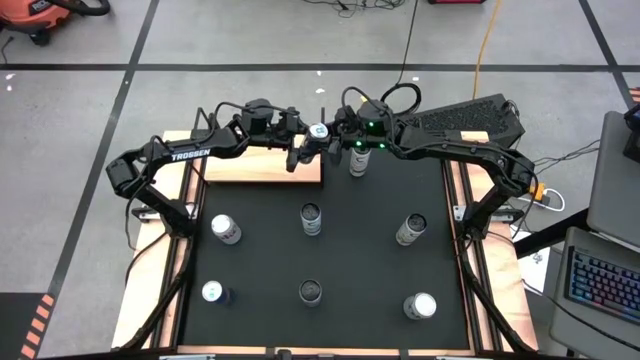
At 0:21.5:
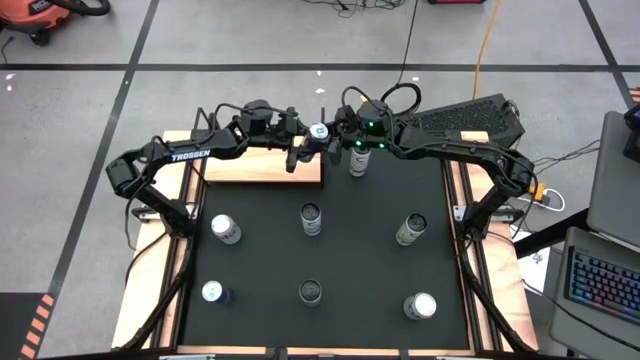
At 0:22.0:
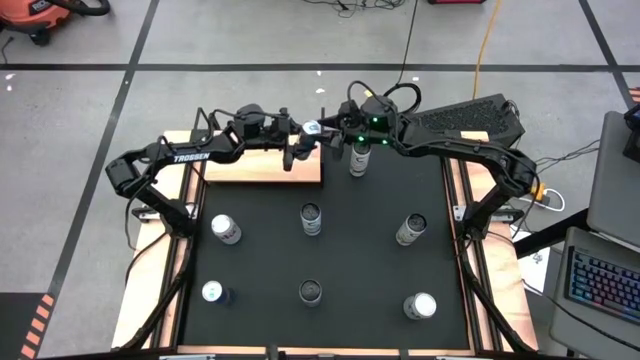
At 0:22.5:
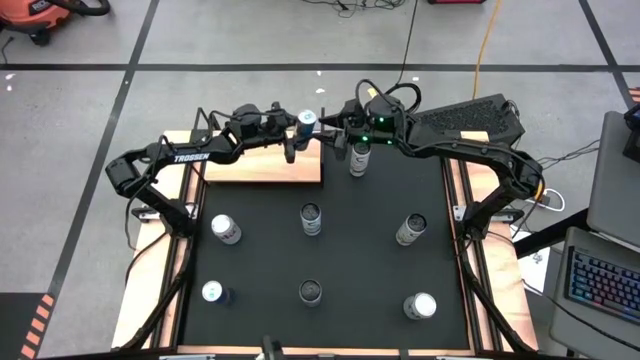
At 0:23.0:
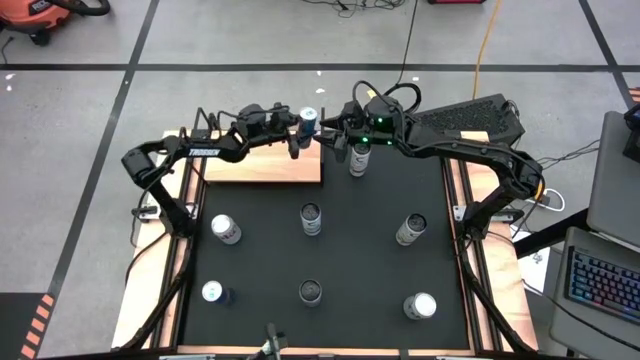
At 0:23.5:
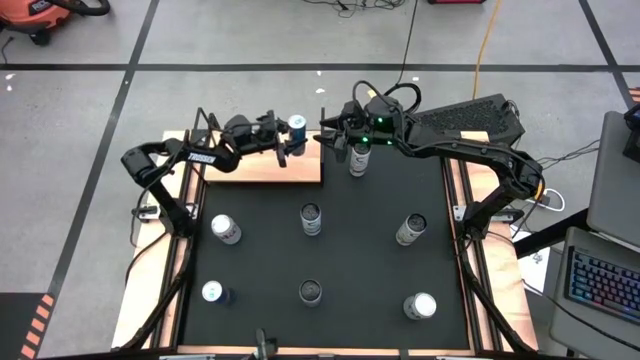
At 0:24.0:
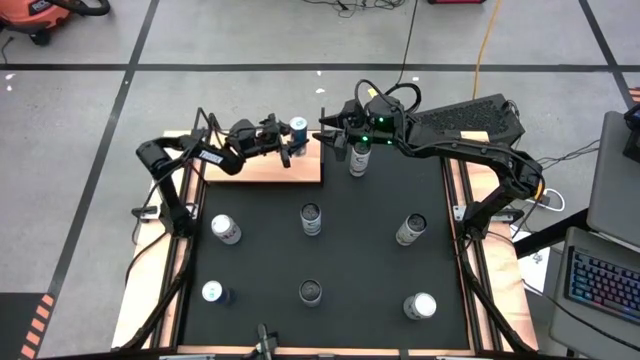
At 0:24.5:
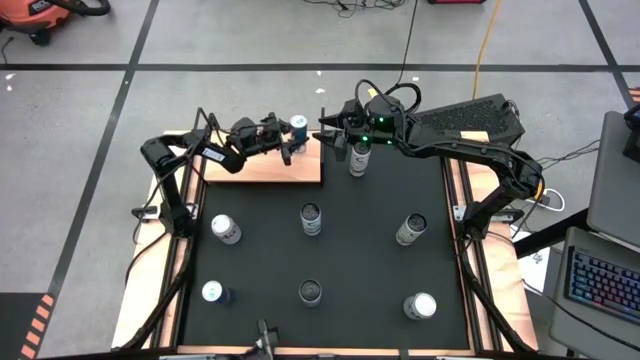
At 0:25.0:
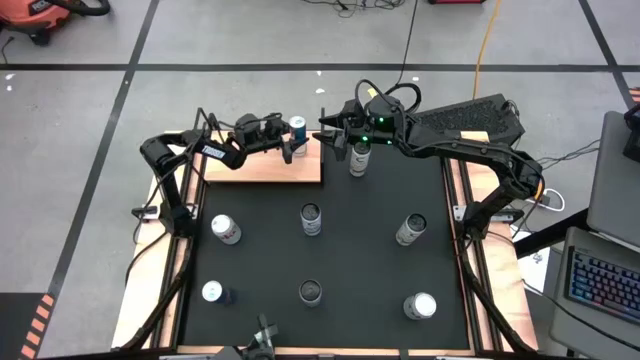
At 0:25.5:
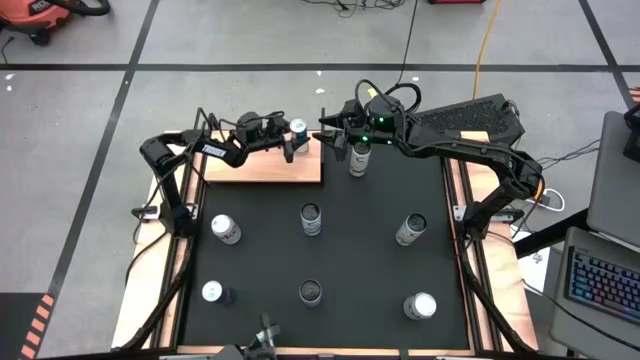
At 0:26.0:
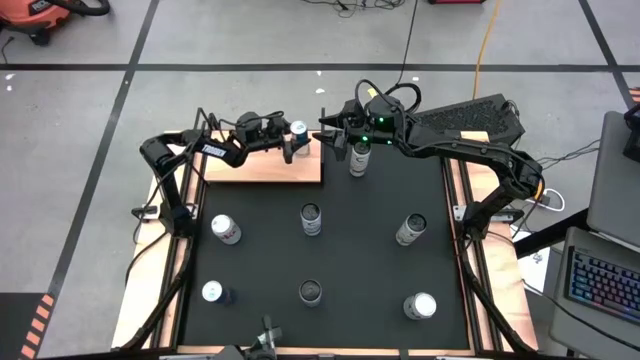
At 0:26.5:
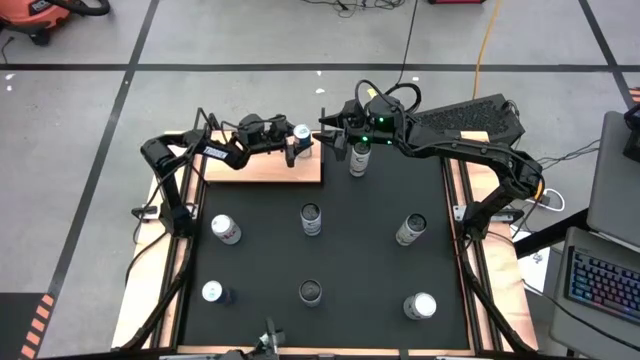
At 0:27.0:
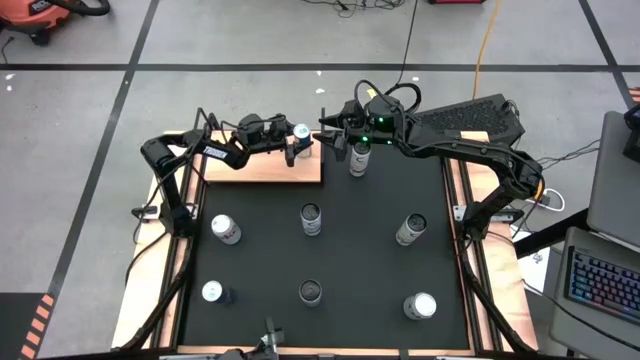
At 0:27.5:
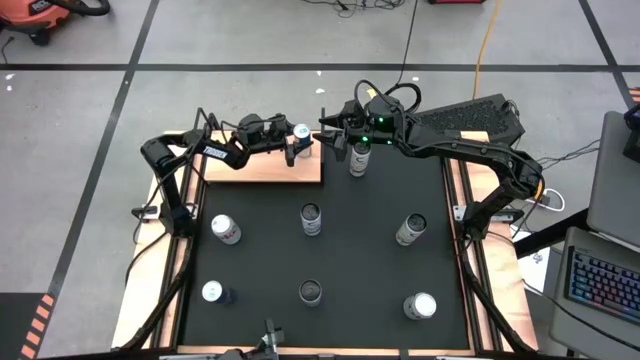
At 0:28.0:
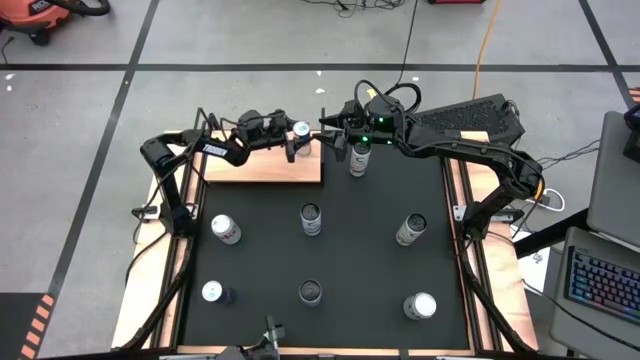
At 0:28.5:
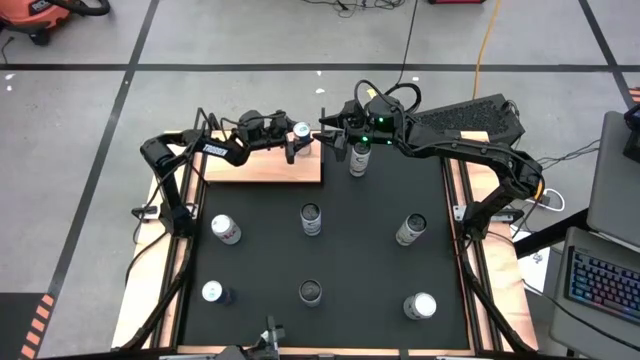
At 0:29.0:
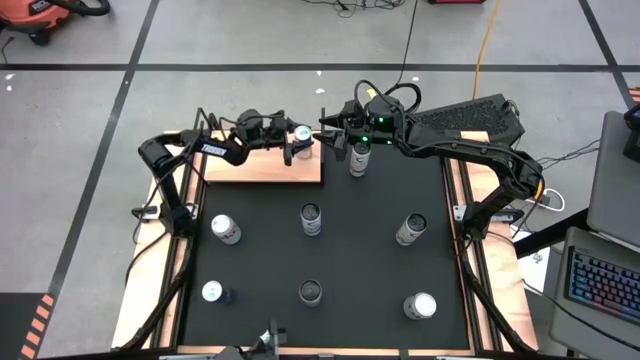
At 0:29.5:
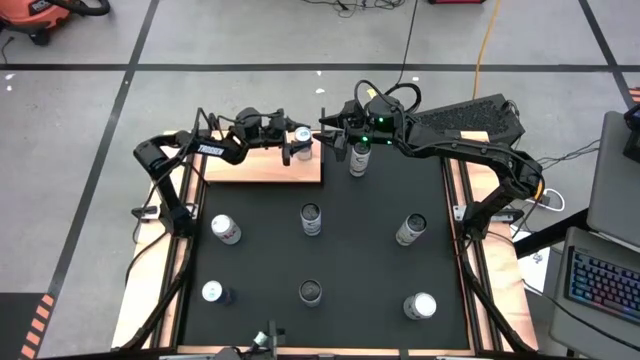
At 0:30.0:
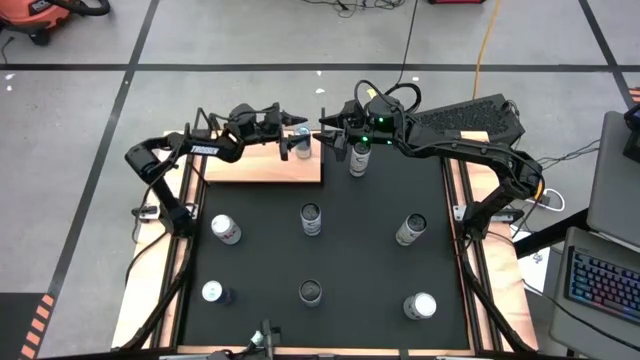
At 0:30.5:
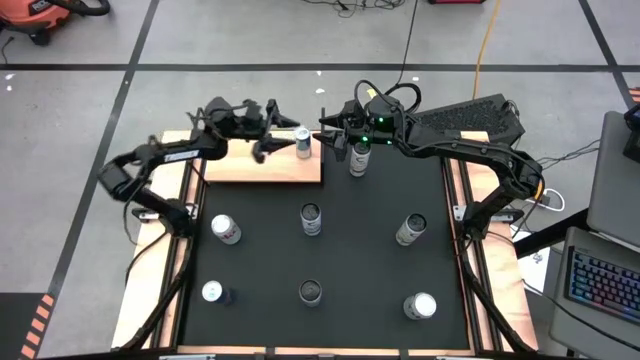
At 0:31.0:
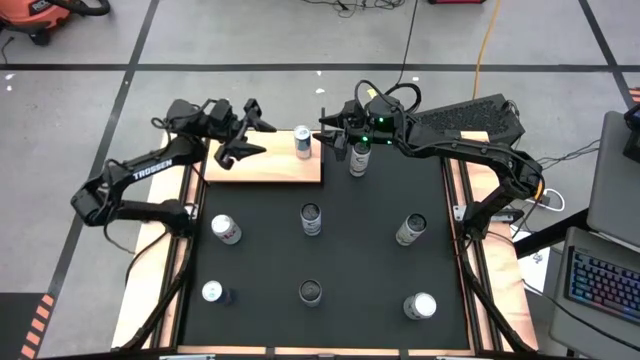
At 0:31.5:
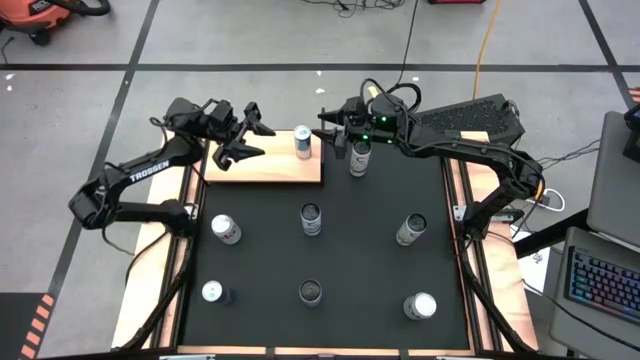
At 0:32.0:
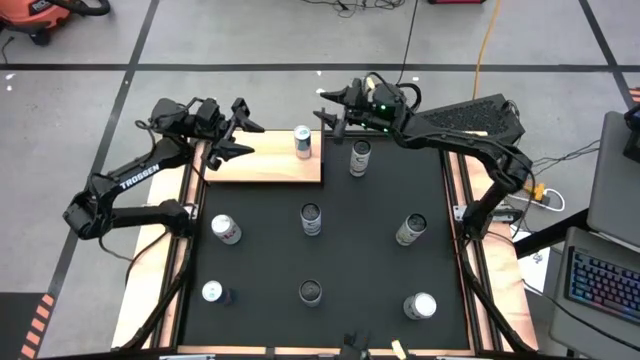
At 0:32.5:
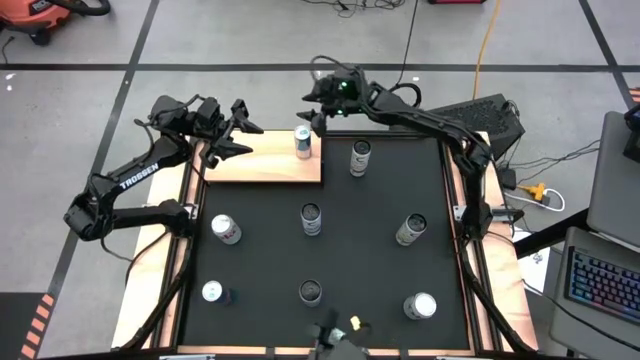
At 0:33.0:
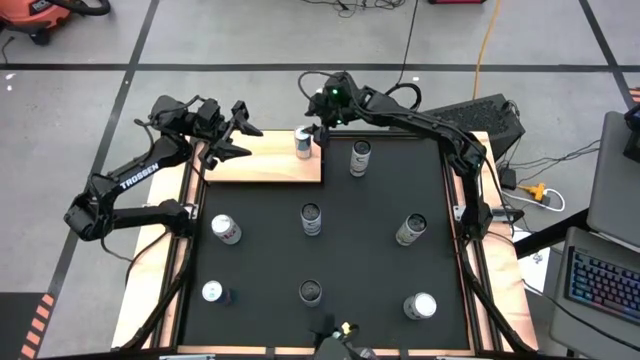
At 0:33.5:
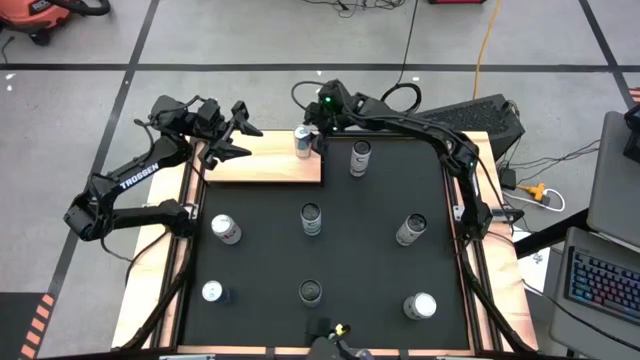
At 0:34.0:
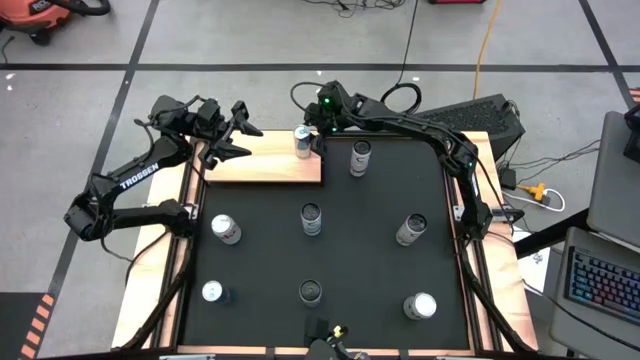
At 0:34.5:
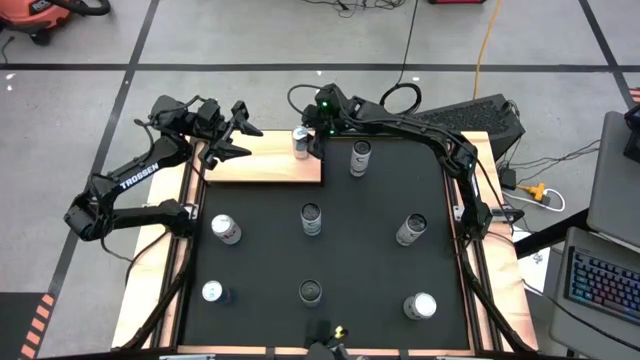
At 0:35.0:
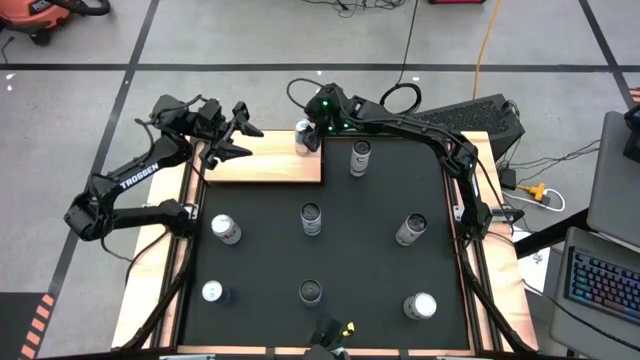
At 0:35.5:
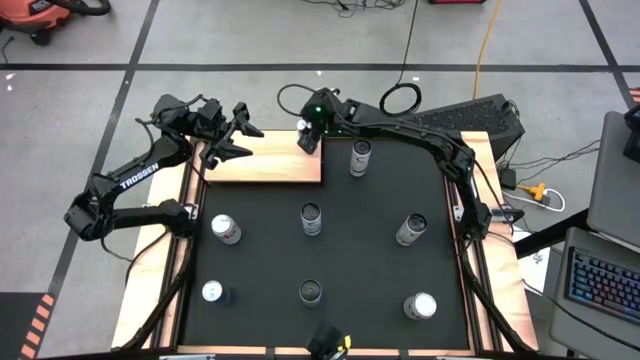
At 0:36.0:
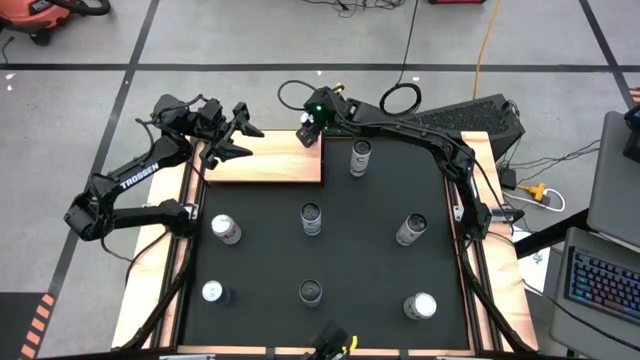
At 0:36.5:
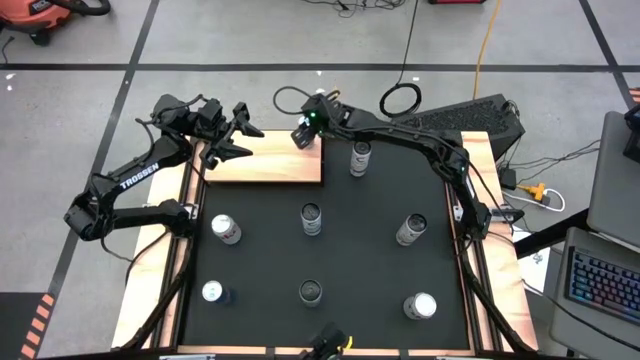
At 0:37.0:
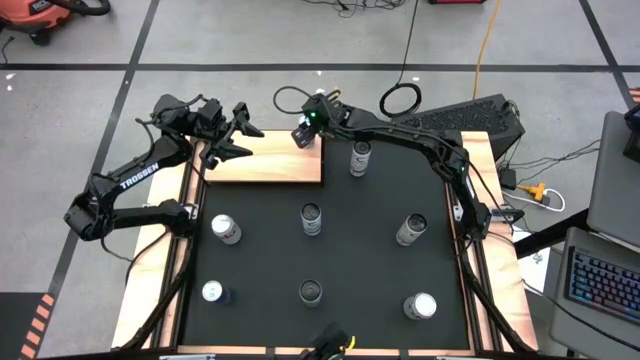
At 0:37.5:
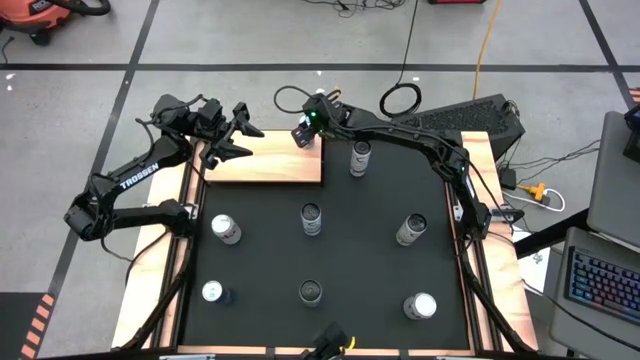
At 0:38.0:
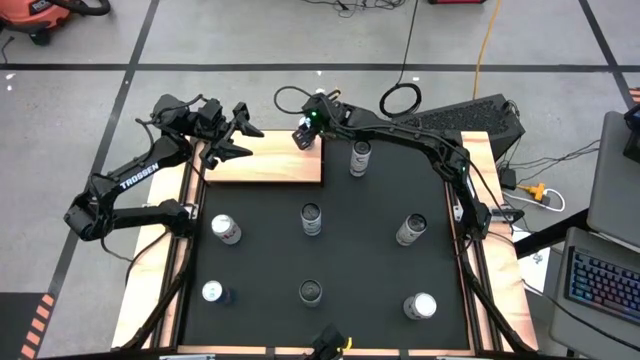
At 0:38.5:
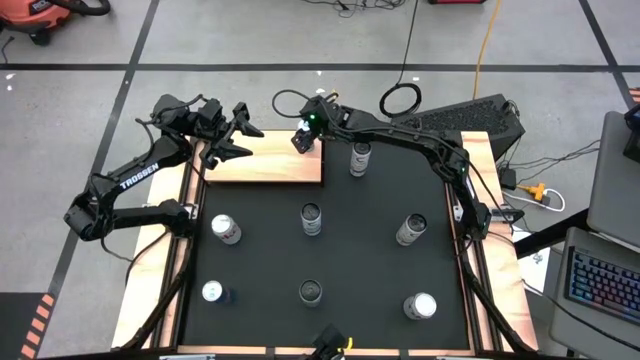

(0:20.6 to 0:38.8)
Task: Place canned beverage on shelf
Put the top blue soda can on the shelf

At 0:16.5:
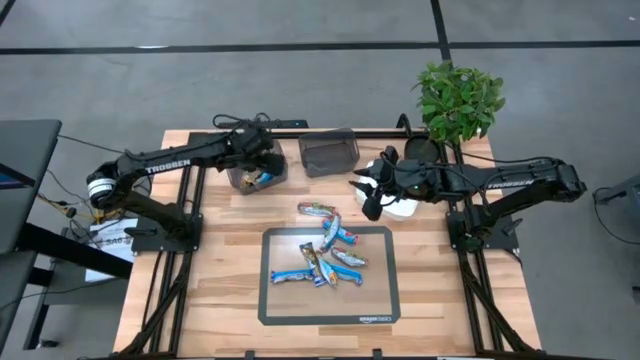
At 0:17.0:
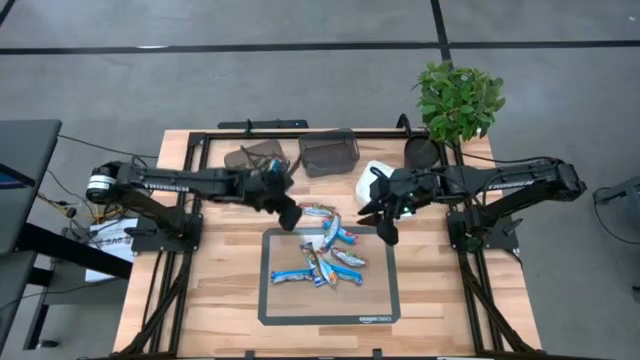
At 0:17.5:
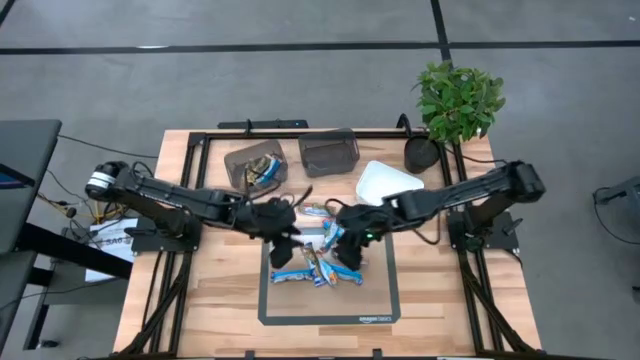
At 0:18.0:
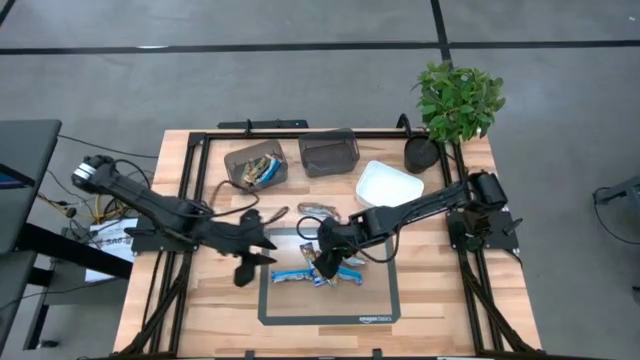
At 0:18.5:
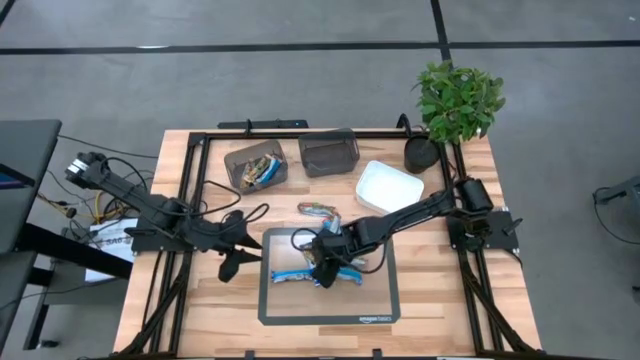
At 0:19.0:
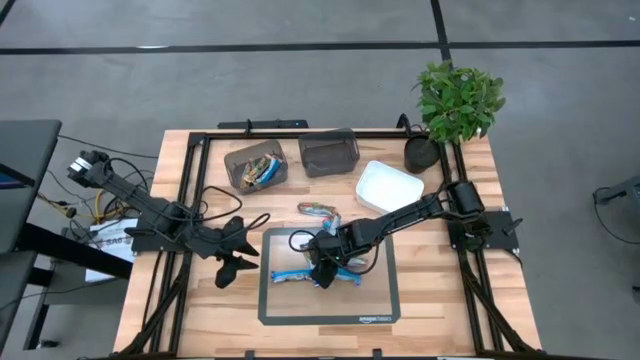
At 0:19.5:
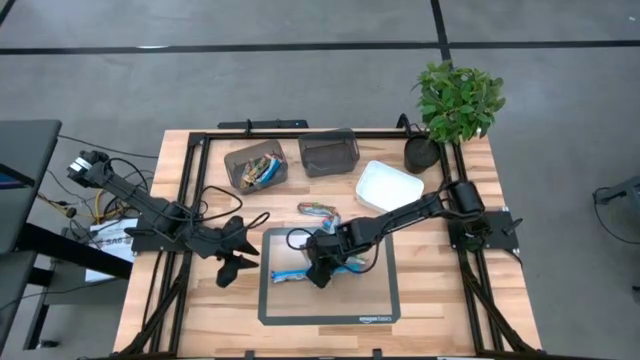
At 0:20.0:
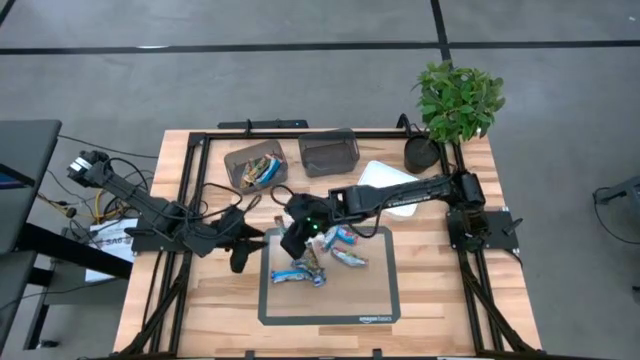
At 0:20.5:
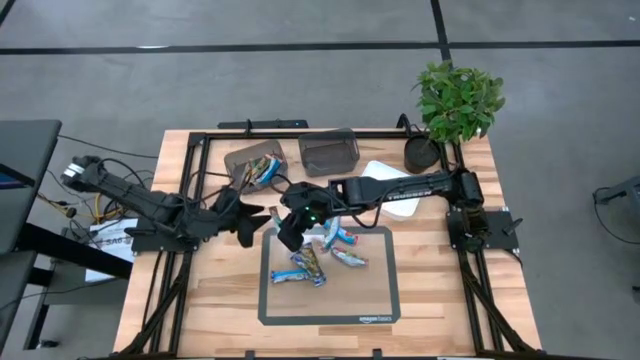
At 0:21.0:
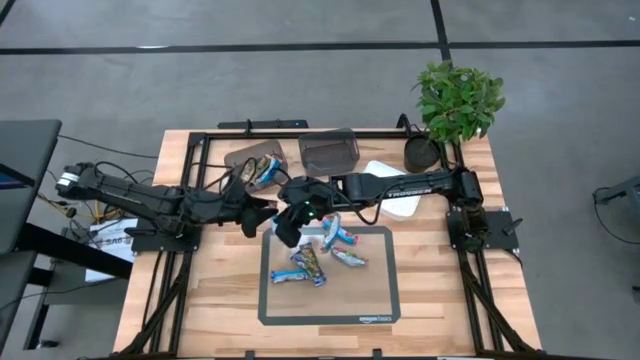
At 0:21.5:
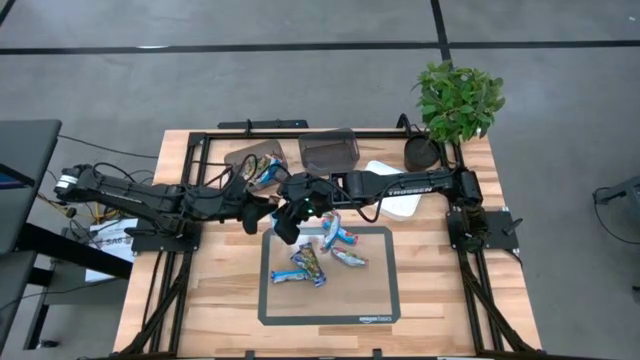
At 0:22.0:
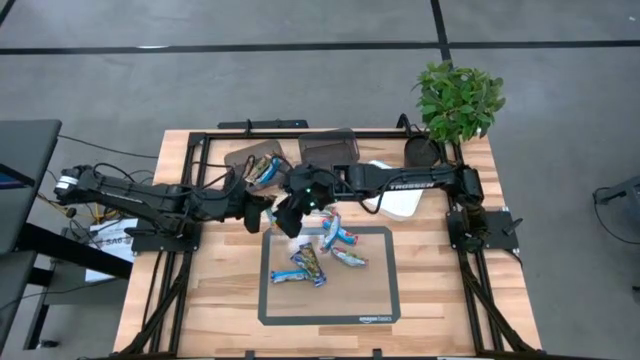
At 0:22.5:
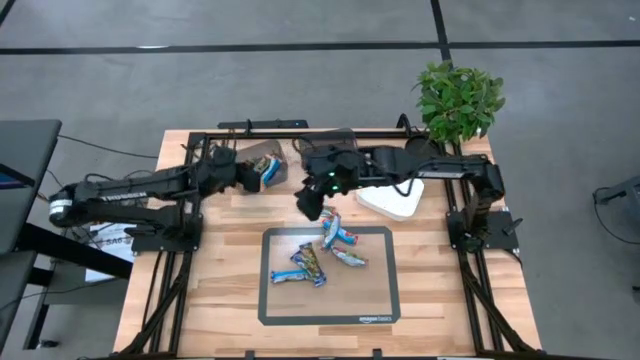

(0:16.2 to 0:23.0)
Task: Pick and place Granola Bars by type
Put the yellow granola bar into the left black bin
